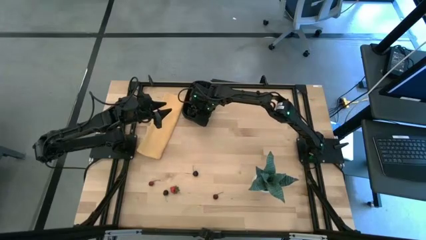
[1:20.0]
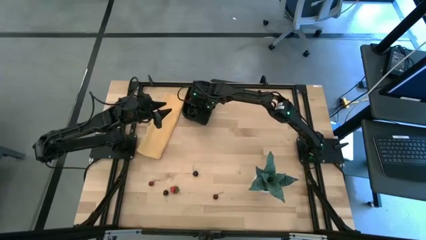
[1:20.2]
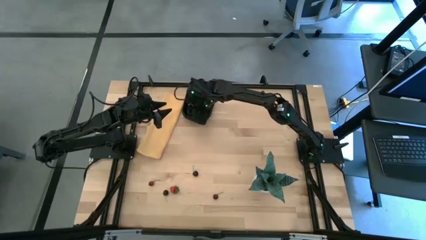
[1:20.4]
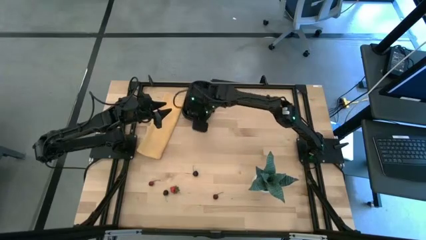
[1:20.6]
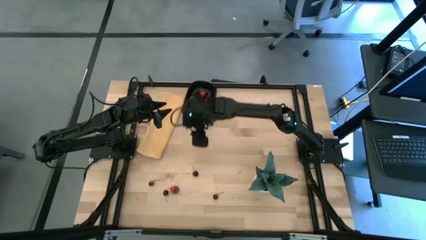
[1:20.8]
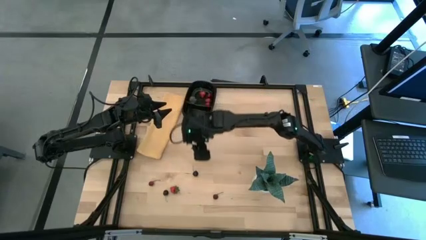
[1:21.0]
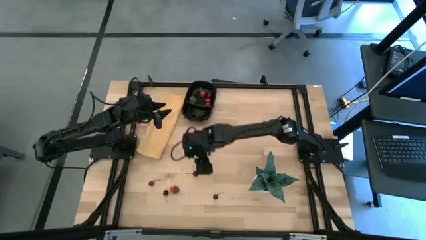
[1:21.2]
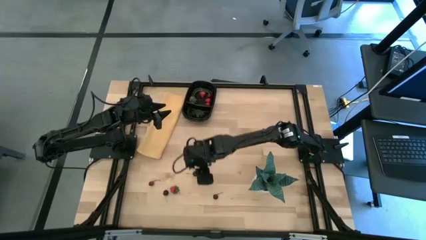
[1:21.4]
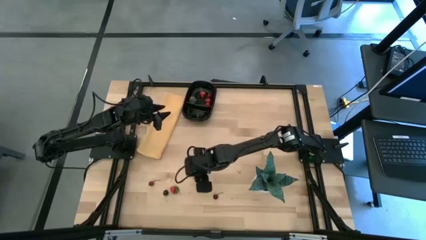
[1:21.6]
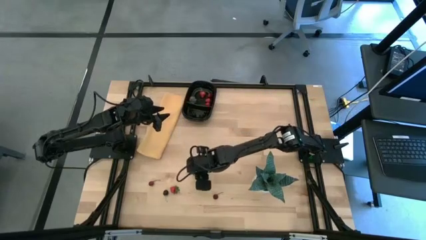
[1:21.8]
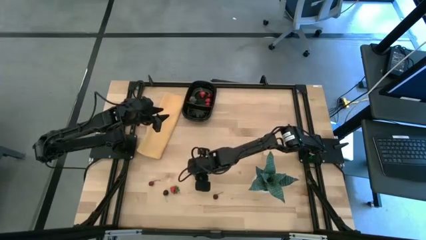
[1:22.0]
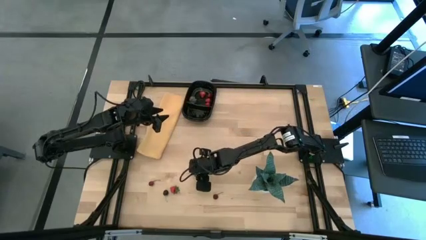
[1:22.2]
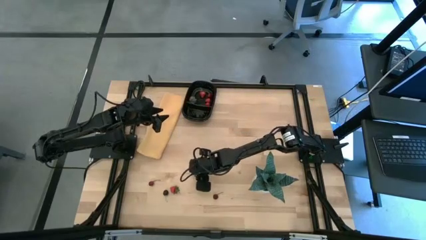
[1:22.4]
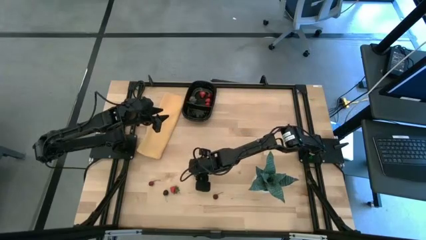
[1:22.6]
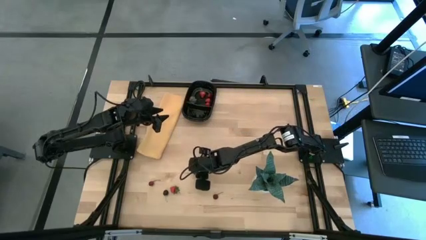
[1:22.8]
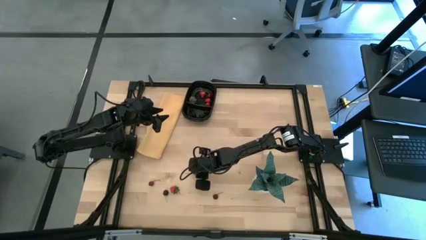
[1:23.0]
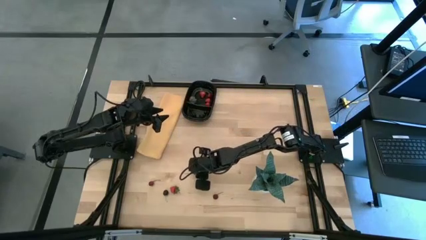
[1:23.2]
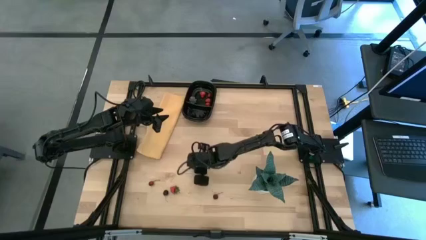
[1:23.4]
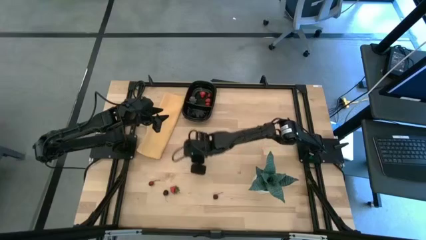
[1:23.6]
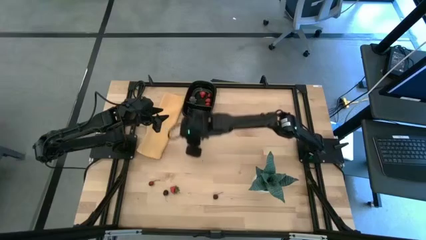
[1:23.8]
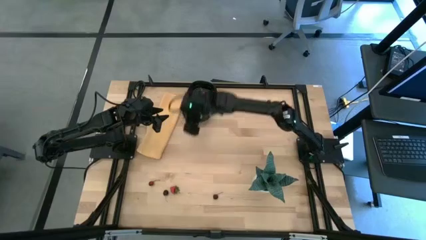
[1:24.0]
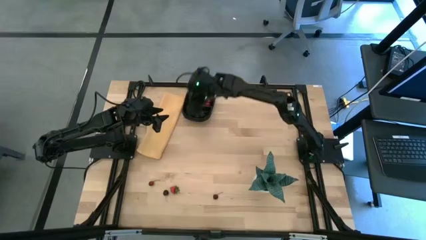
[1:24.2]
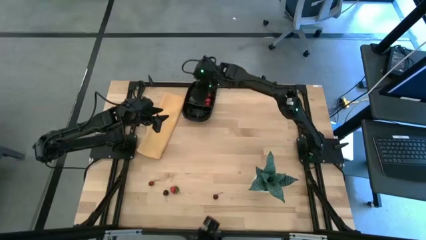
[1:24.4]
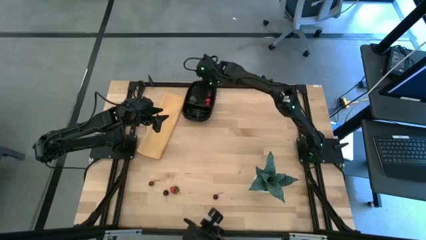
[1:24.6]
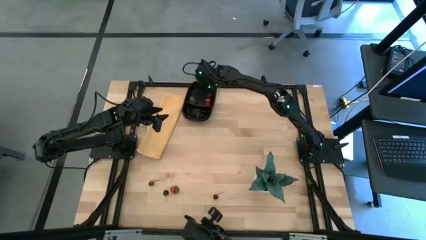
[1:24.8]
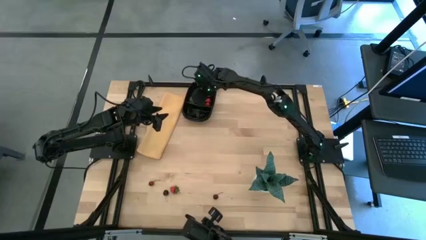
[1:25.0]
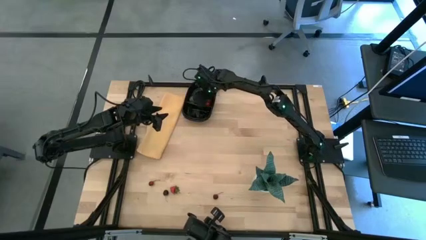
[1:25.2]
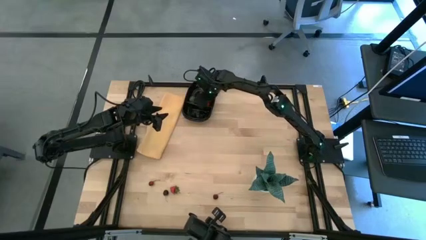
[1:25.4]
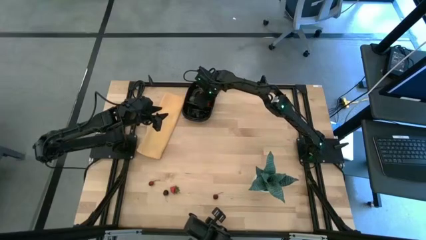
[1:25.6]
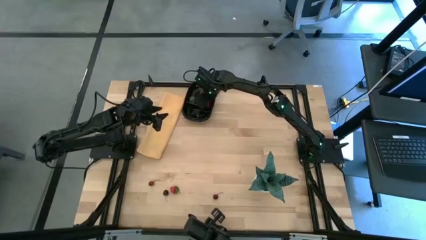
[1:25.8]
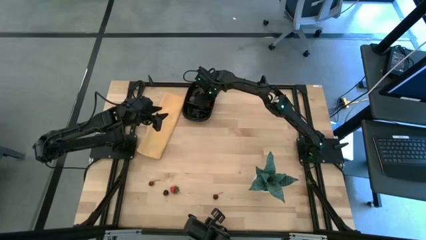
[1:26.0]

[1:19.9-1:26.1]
Task: Pick and placing Produce into tupperware
Put the top black cherry into the black bin

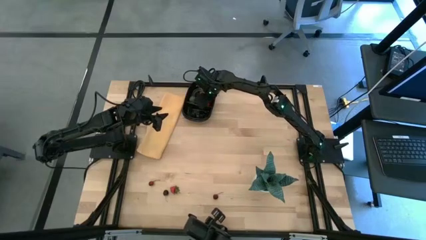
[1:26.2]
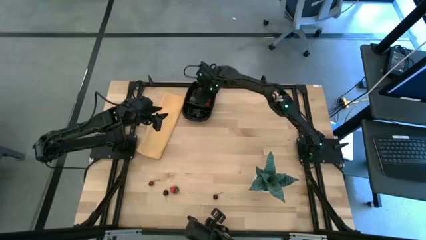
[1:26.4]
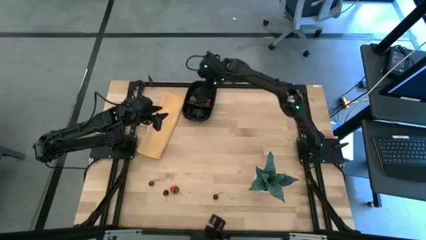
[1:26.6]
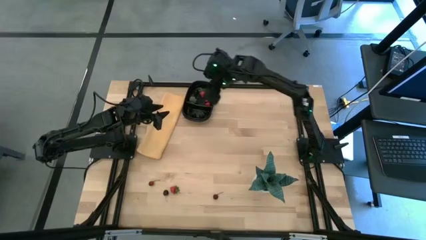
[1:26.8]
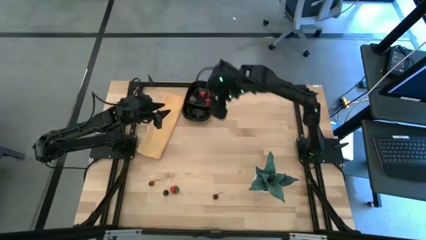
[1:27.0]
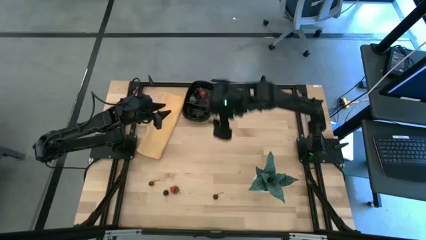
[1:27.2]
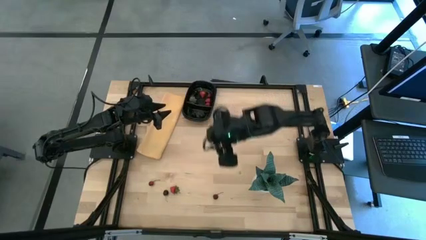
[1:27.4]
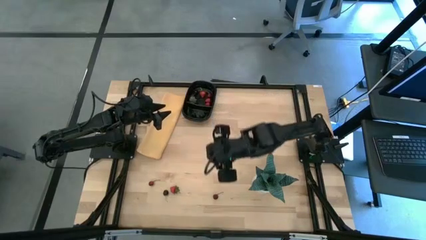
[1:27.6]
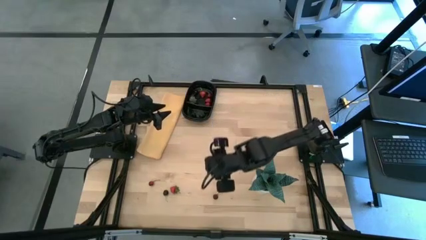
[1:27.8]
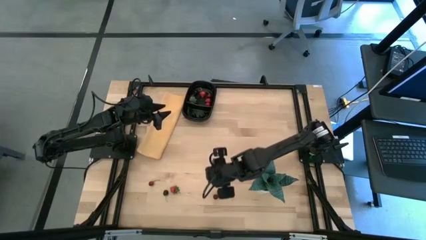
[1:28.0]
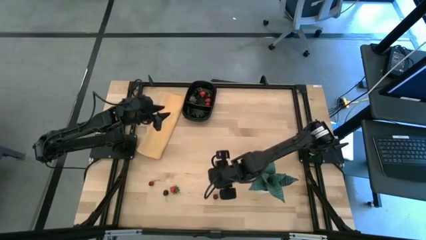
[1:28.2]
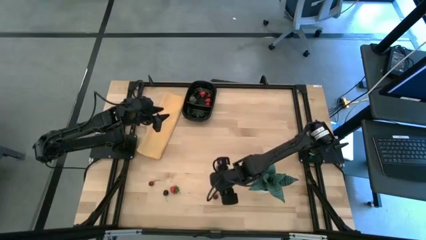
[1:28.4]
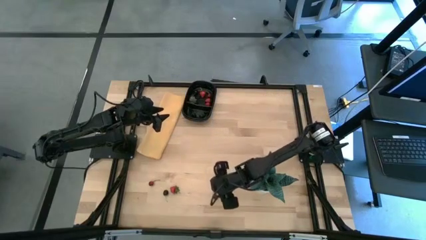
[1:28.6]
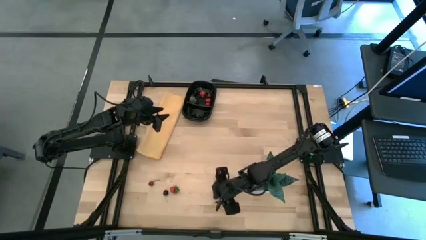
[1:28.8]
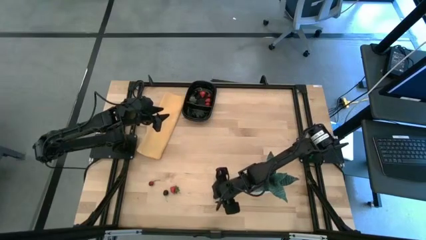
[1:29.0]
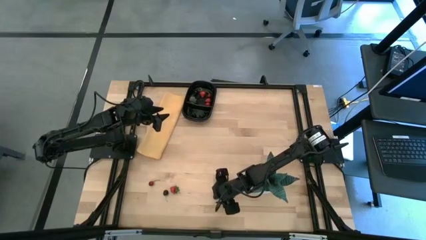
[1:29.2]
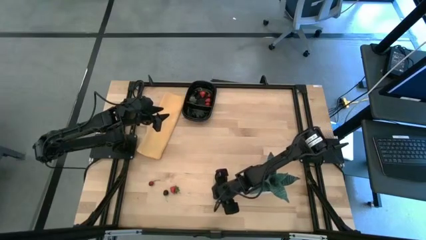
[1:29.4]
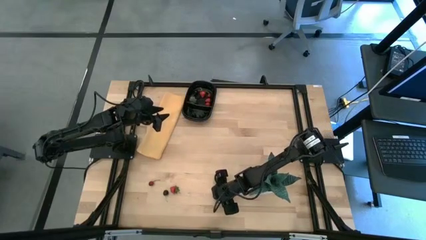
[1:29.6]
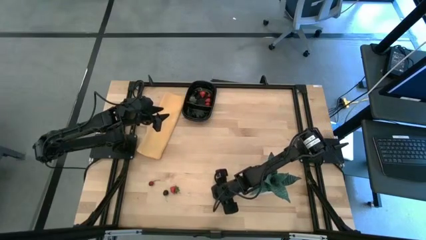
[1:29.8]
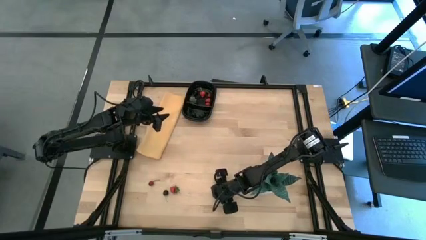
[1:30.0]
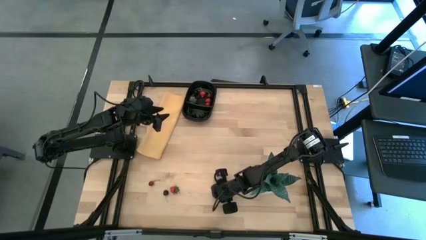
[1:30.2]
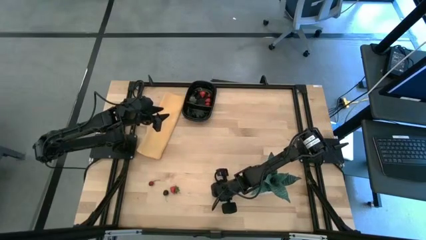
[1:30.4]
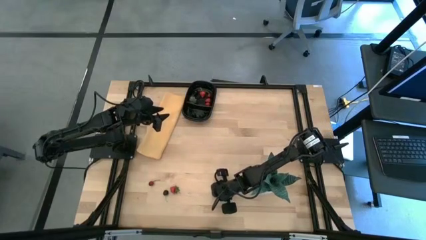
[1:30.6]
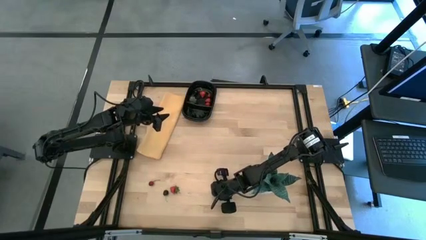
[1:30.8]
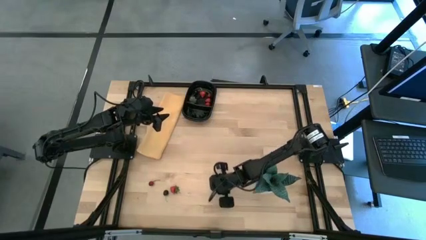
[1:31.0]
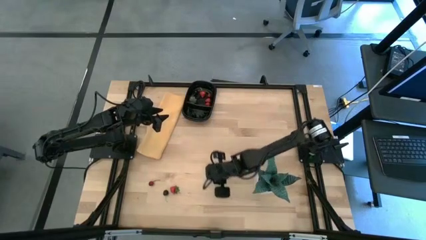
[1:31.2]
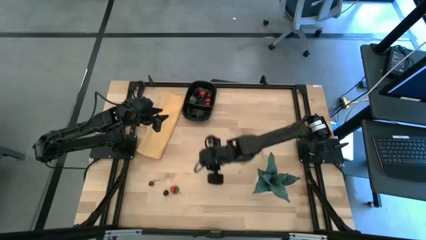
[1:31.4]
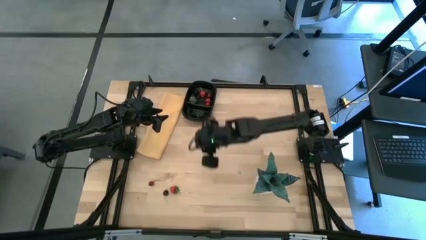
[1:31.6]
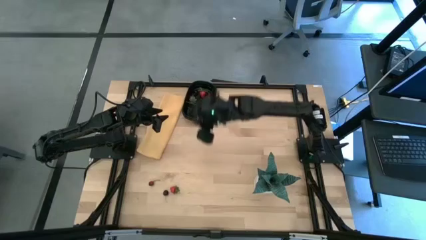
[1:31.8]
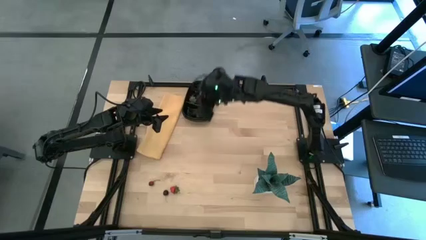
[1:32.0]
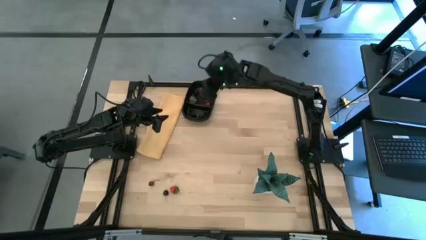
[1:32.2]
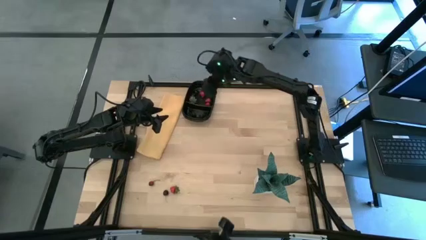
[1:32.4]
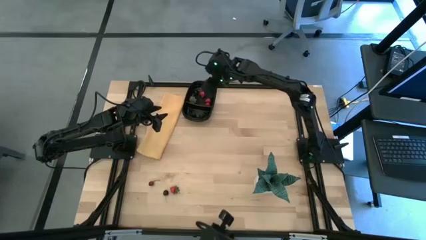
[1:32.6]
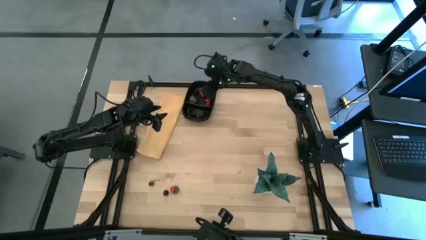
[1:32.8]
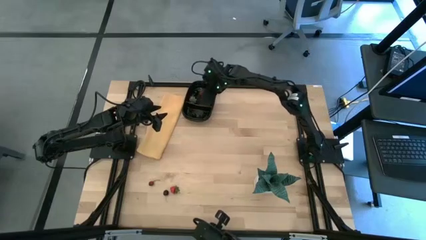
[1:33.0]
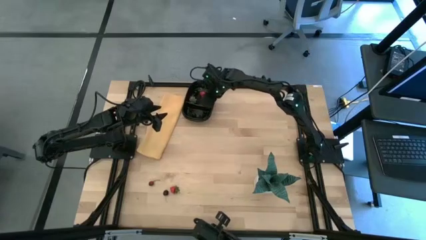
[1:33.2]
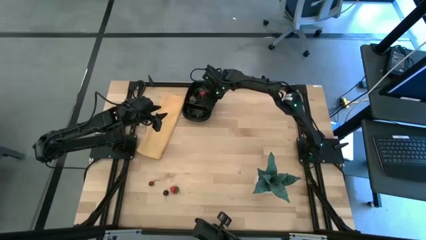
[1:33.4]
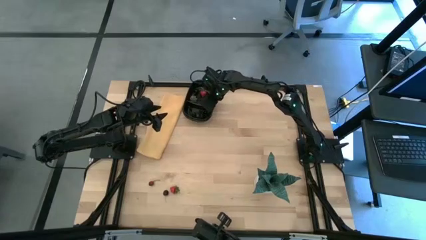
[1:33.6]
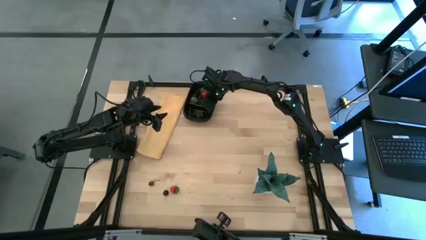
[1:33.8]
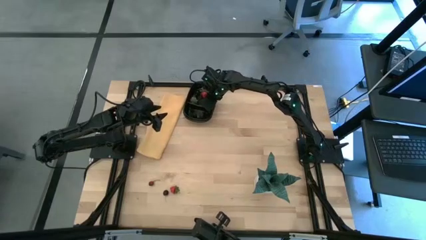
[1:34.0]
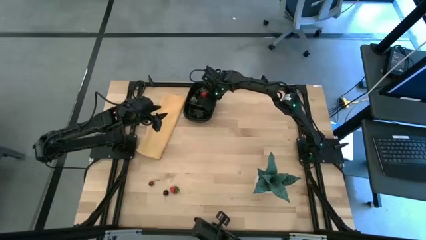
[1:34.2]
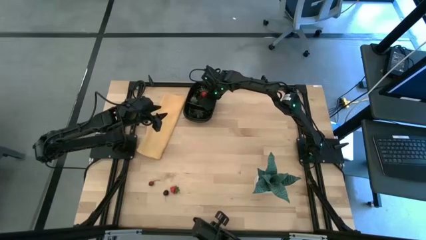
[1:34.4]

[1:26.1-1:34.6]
Put the right red cherry into the black bin
